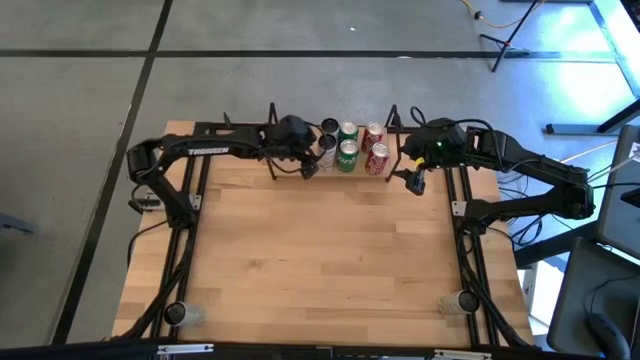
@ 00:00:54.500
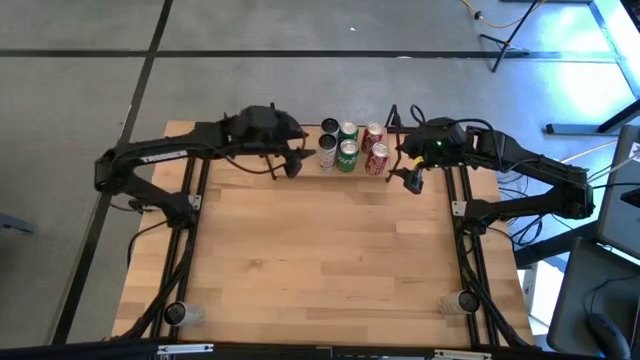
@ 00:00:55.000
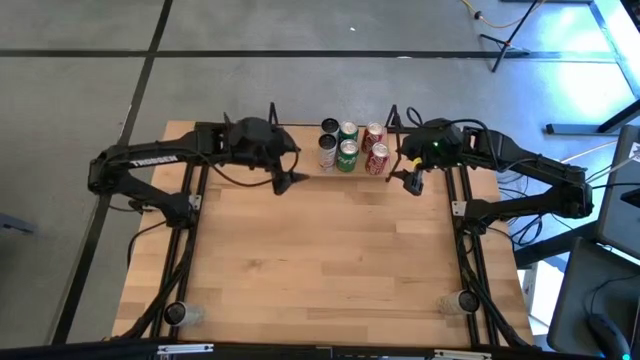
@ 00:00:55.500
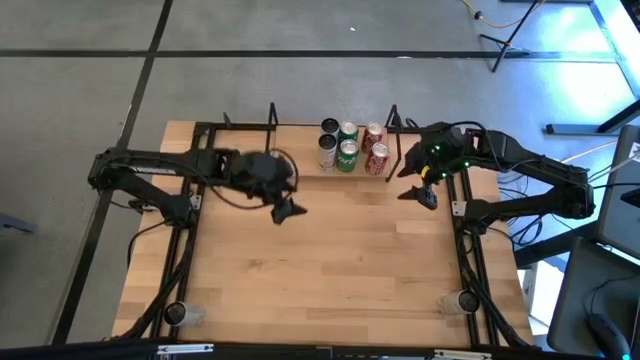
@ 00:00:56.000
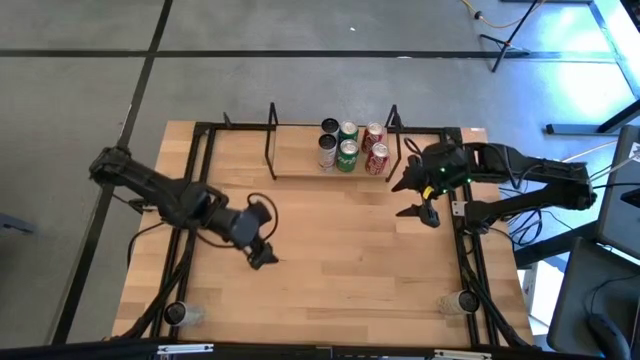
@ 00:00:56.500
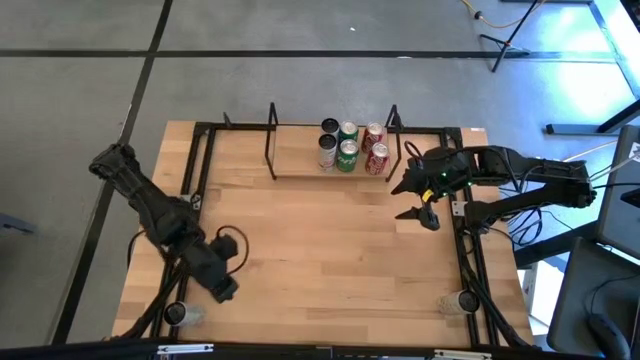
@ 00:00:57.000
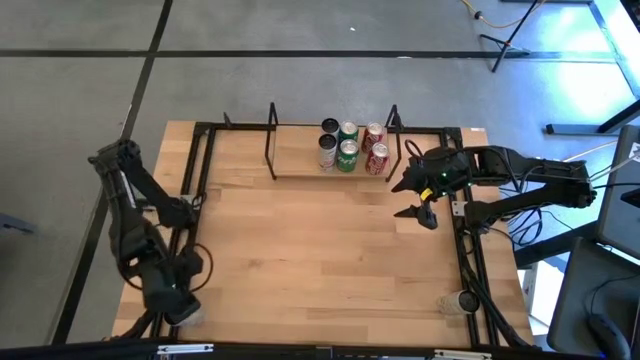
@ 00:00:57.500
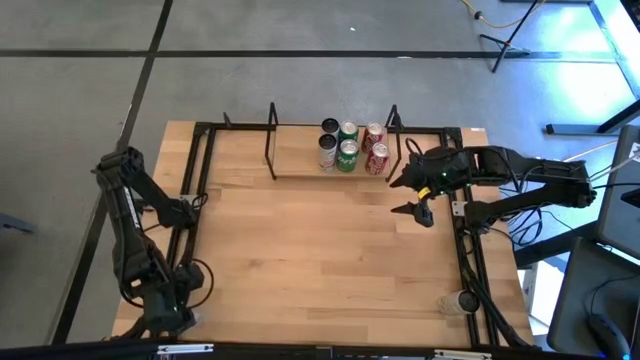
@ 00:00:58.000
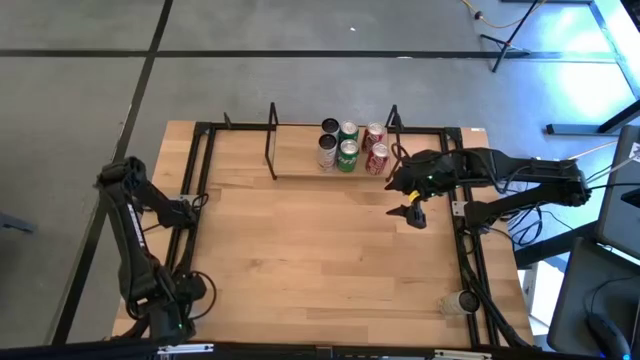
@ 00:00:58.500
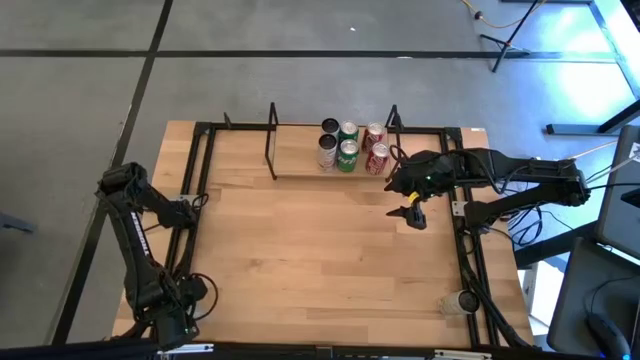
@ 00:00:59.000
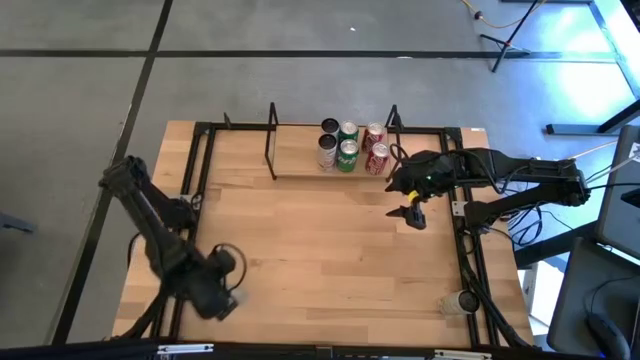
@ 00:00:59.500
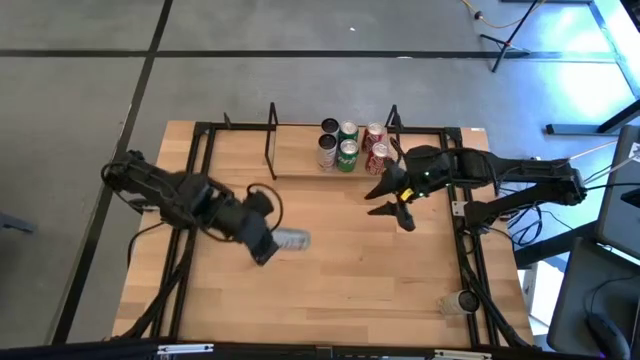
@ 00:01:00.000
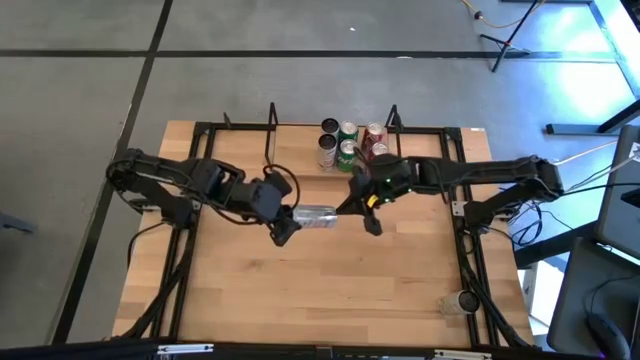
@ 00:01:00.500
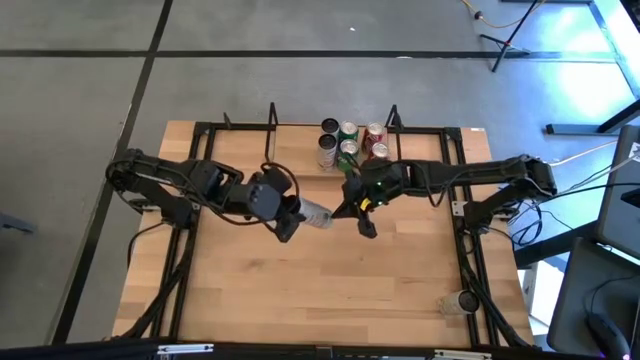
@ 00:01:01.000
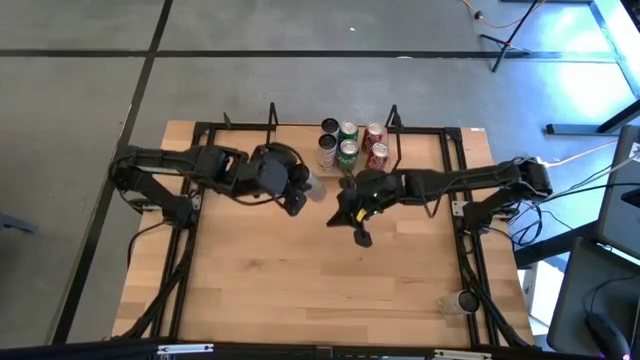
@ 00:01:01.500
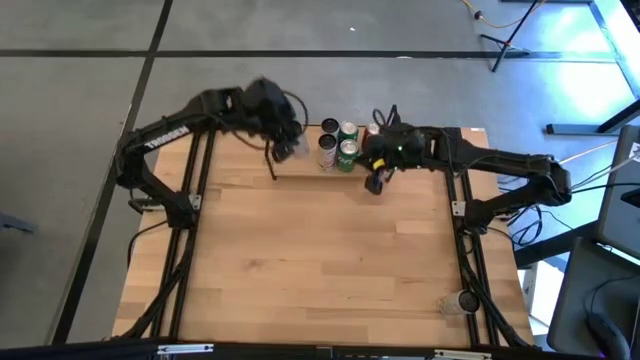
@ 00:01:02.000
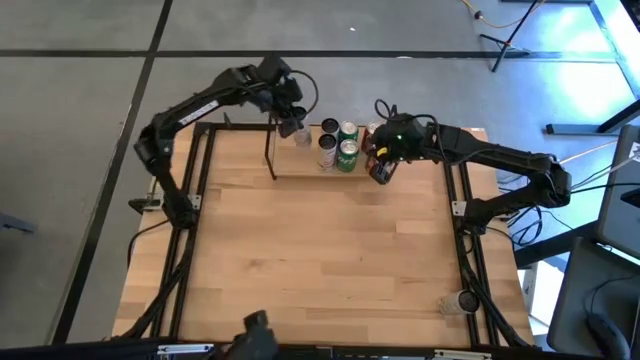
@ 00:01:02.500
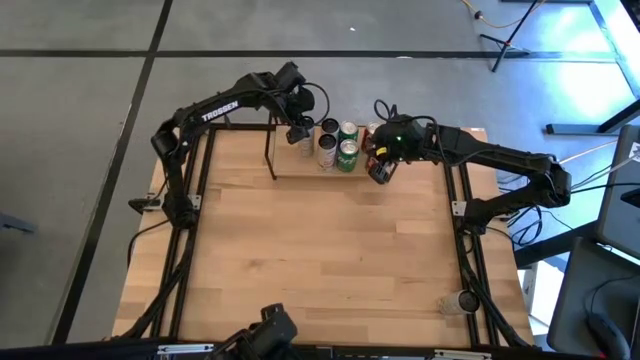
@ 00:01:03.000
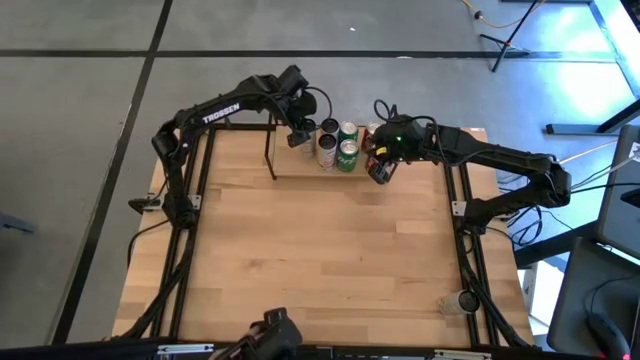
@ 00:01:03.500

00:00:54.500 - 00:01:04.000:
Task: Place canned beverage on shelf
Put the left white yellow soda can on the shelf

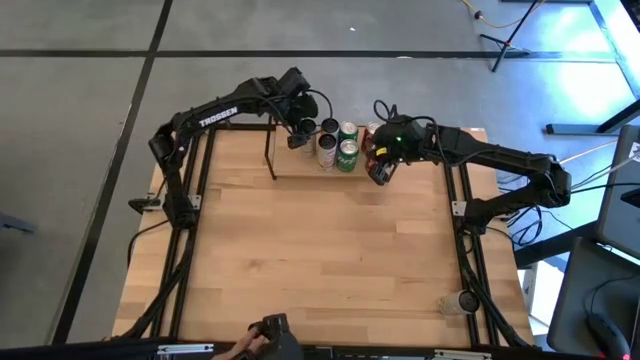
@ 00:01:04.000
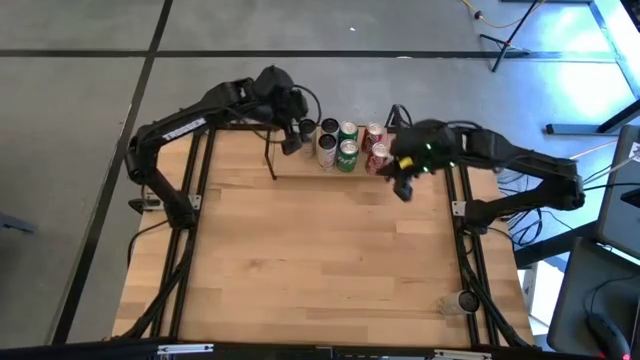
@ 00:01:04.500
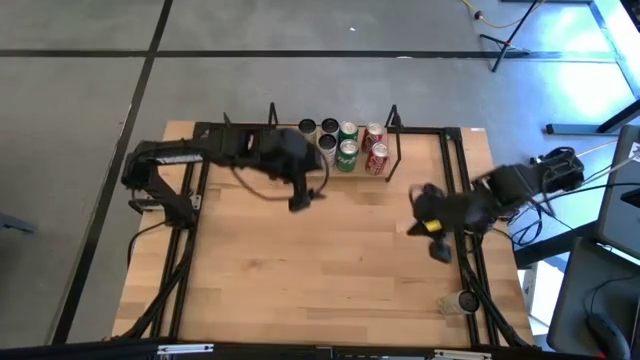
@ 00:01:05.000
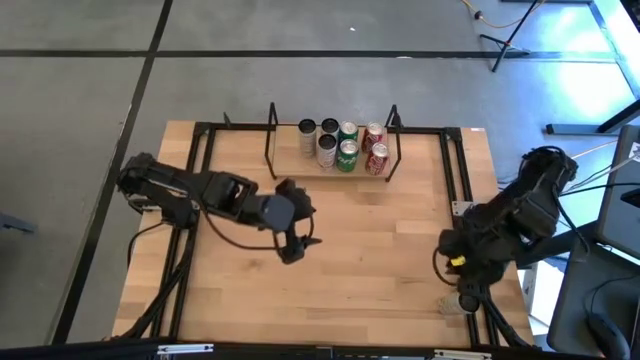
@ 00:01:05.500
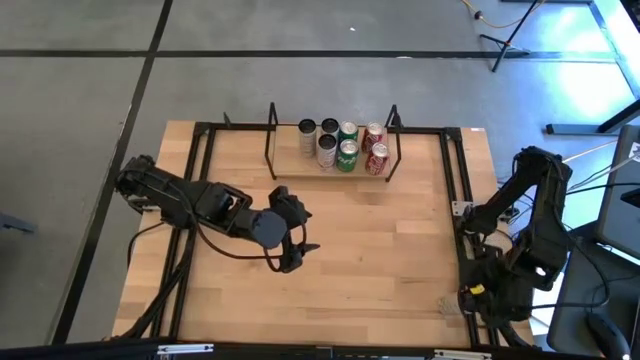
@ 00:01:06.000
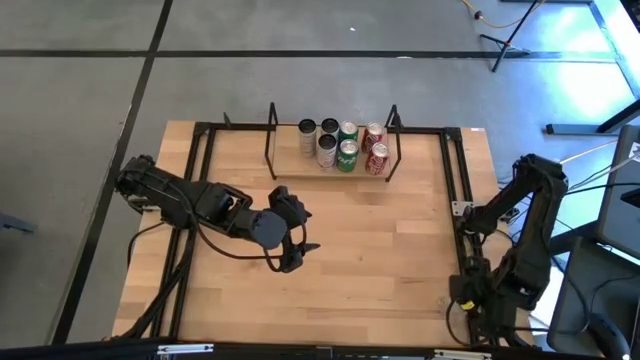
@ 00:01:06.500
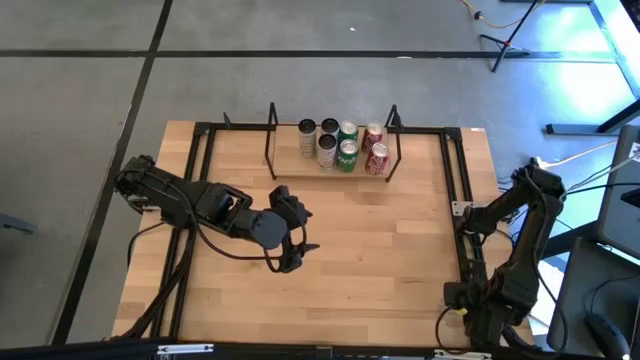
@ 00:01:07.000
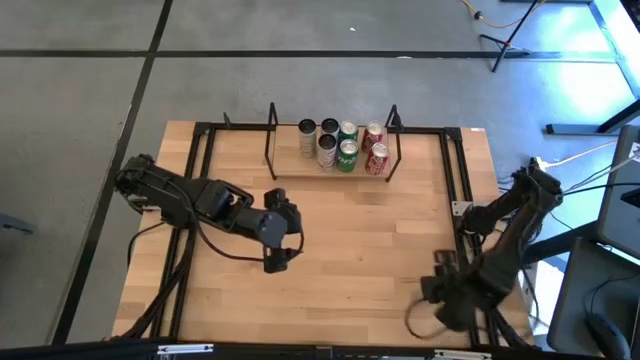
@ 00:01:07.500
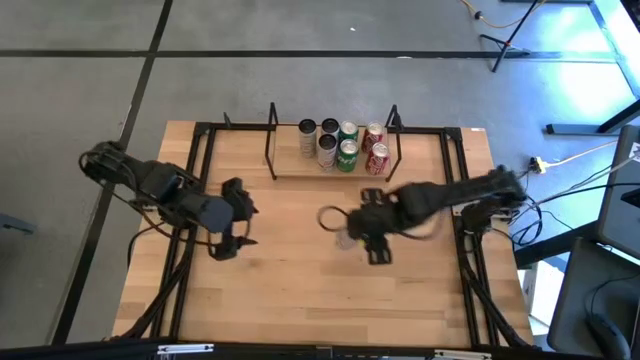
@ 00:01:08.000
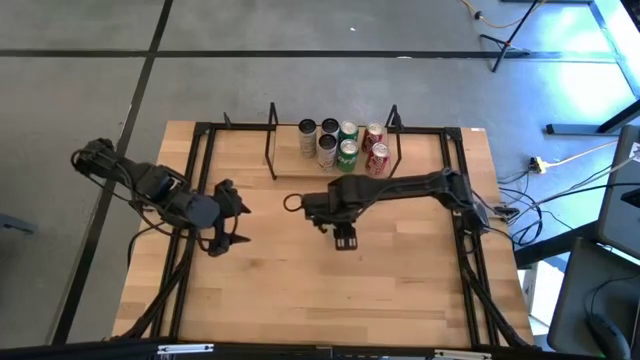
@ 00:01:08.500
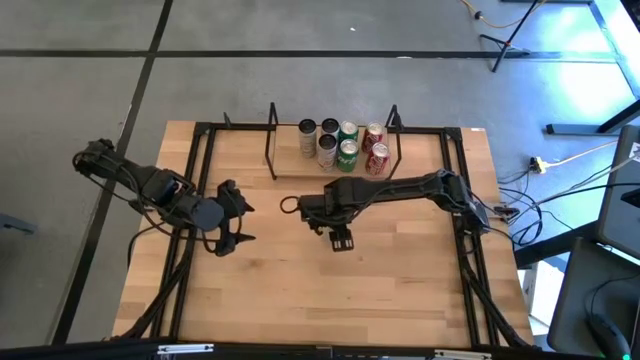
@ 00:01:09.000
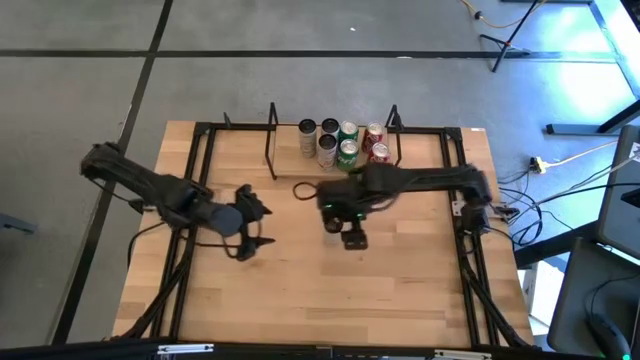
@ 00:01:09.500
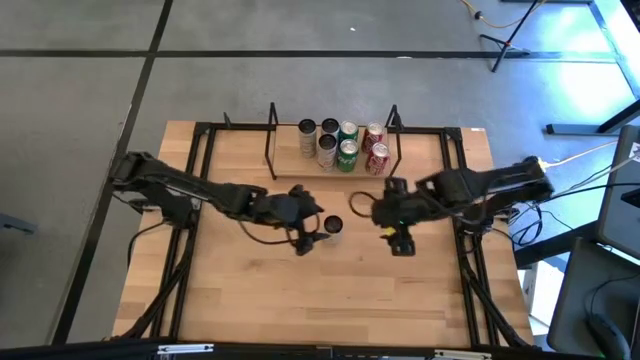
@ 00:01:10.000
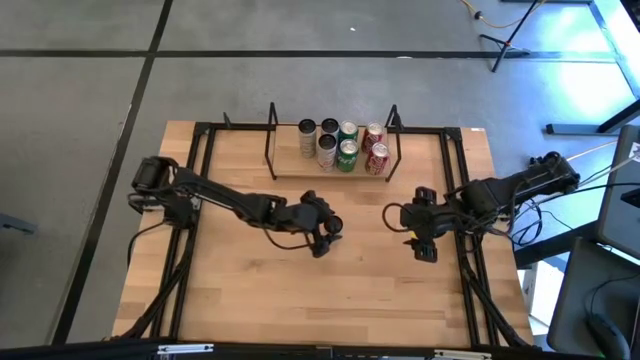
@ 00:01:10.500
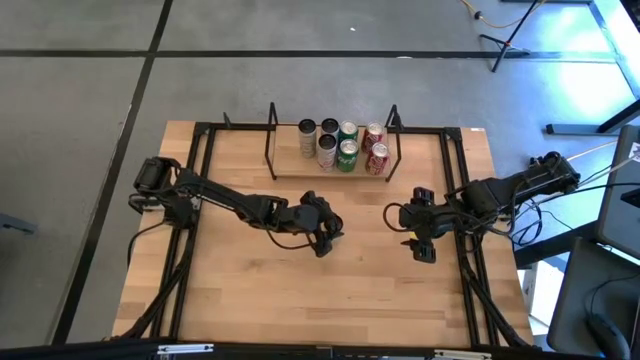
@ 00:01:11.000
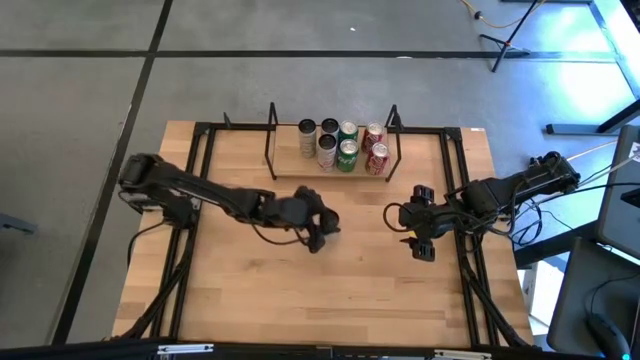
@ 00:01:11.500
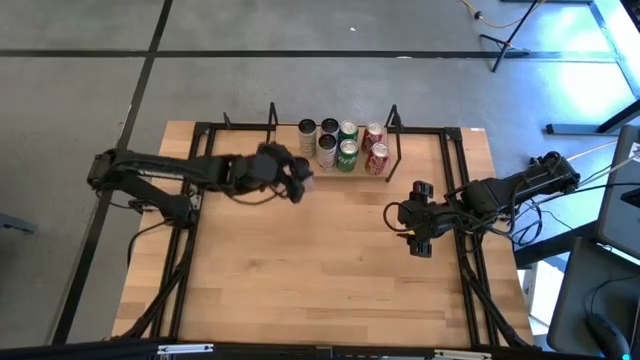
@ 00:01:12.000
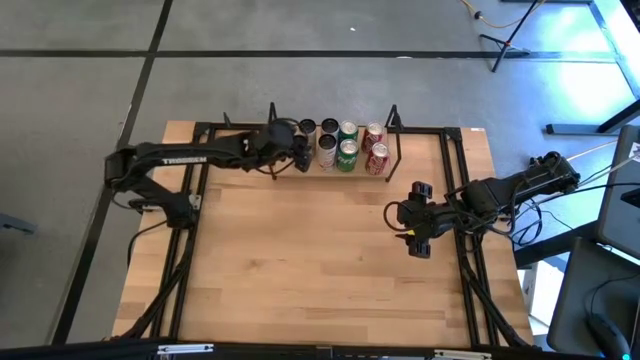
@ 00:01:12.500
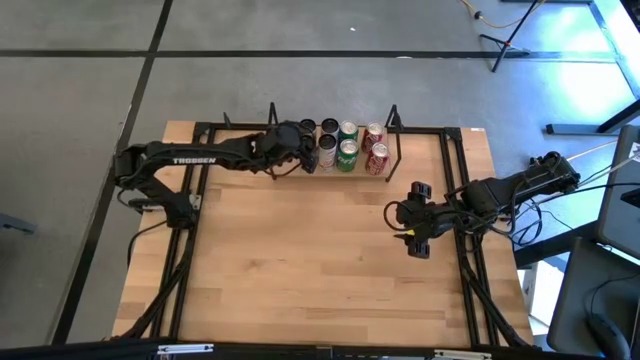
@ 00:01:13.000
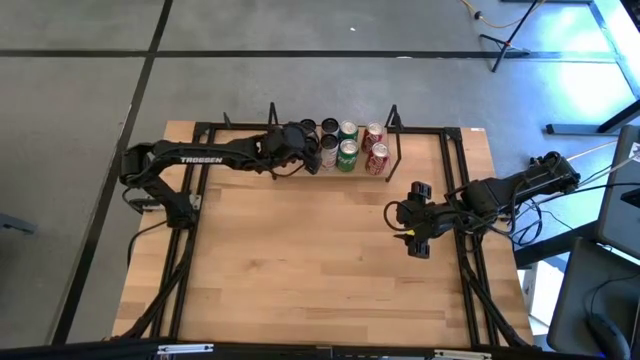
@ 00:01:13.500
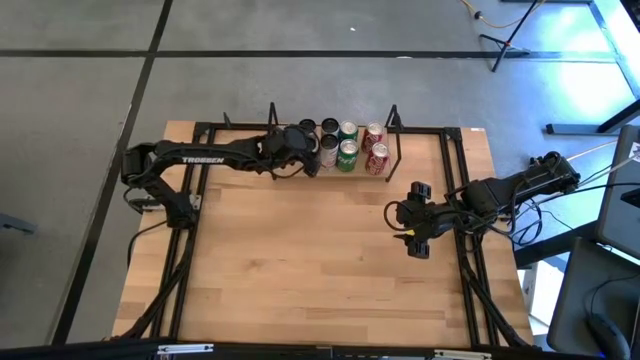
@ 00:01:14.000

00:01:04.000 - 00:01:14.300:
Put the white yellow soda can on the shelf aligned with the other white yellow soda can
